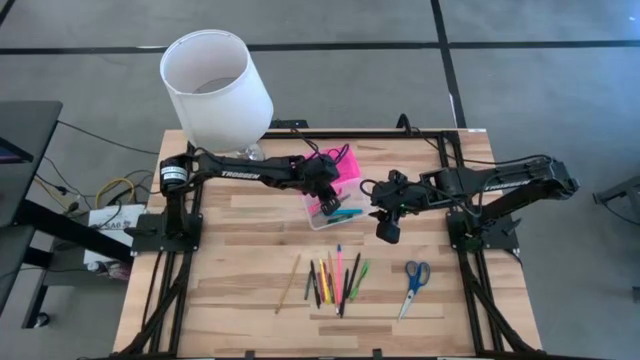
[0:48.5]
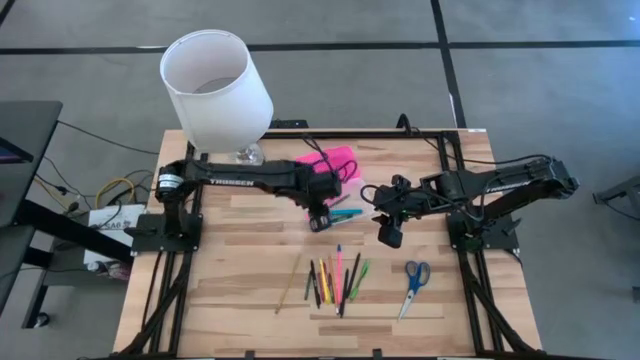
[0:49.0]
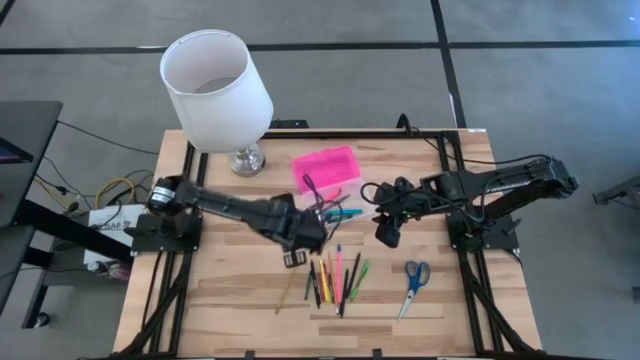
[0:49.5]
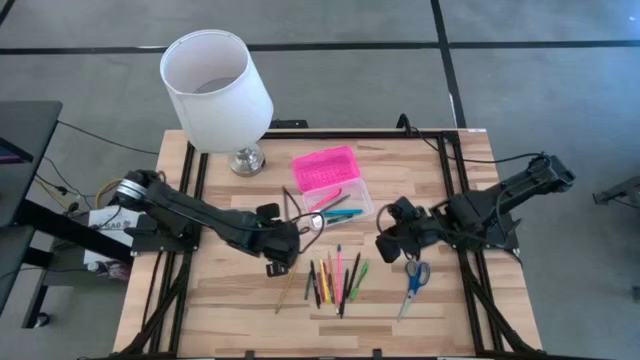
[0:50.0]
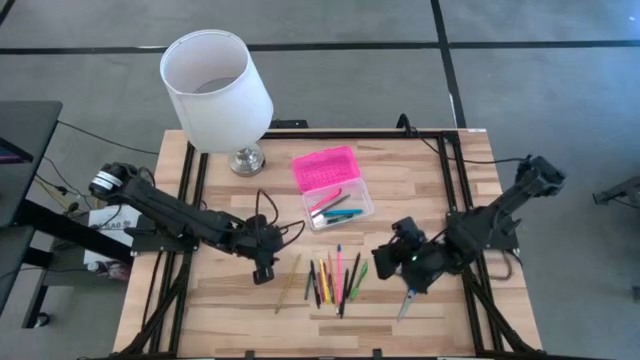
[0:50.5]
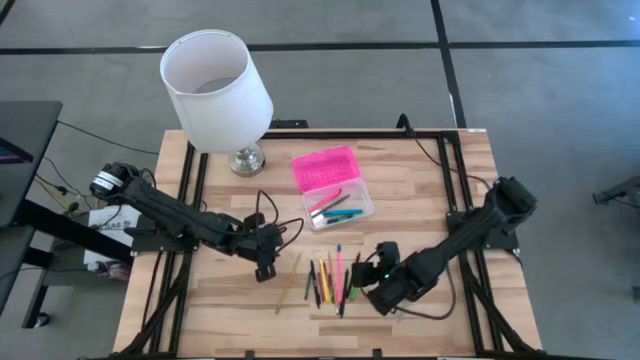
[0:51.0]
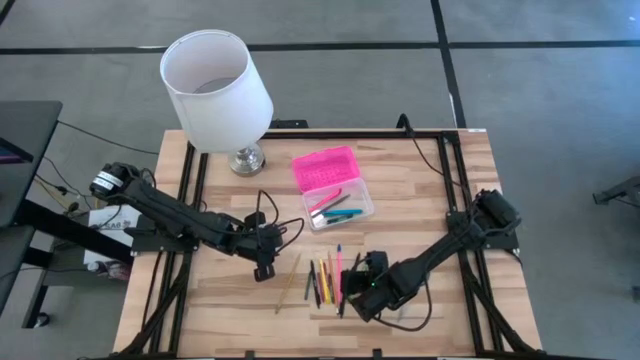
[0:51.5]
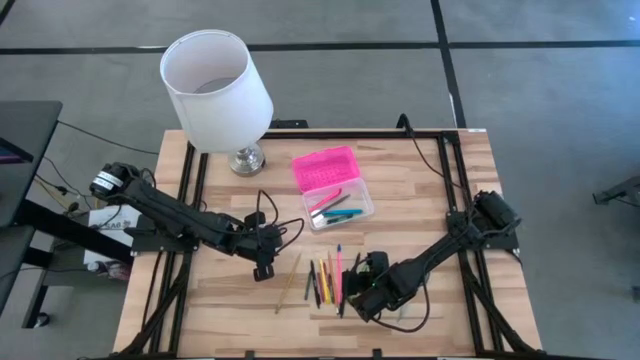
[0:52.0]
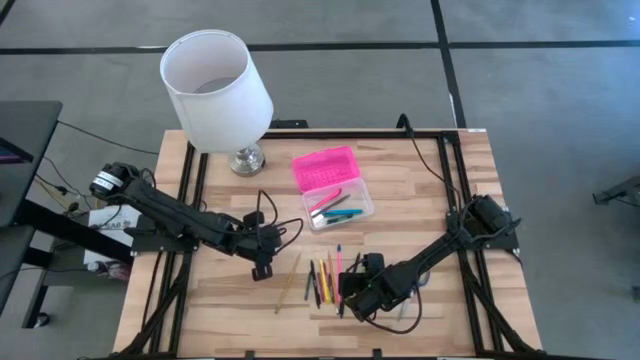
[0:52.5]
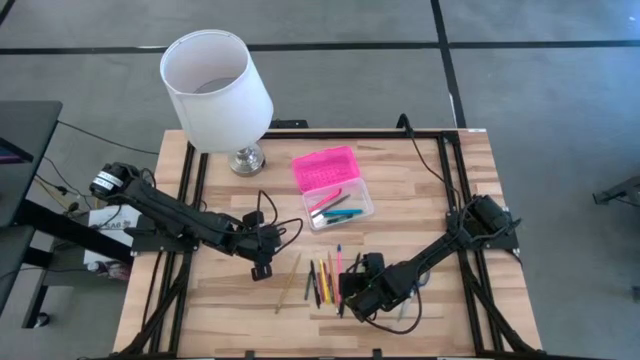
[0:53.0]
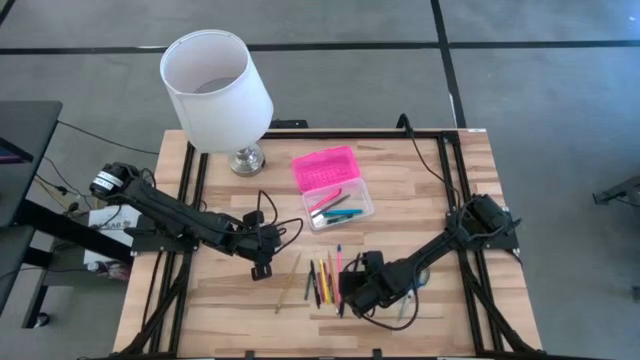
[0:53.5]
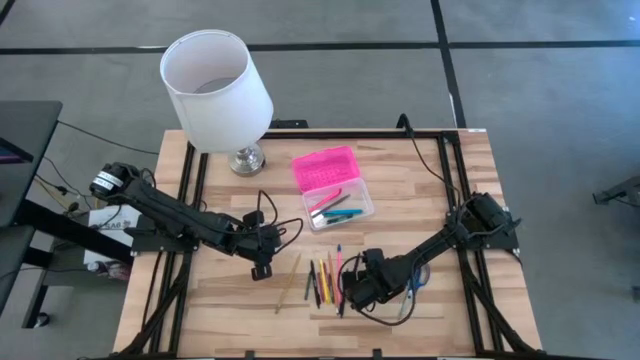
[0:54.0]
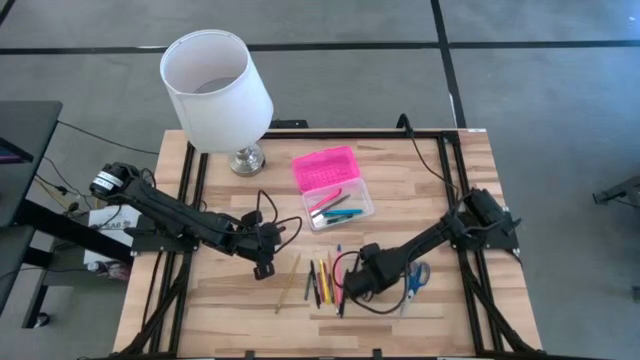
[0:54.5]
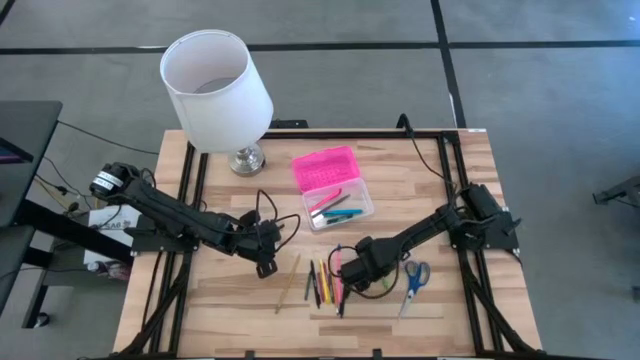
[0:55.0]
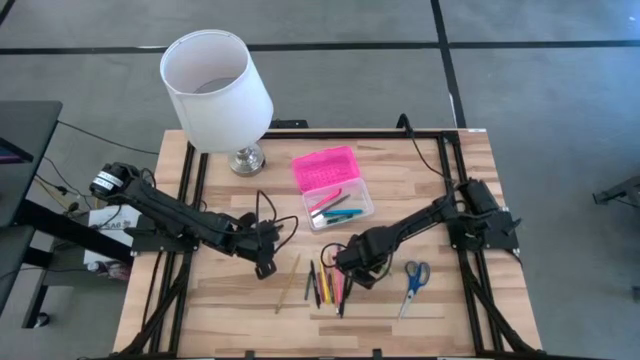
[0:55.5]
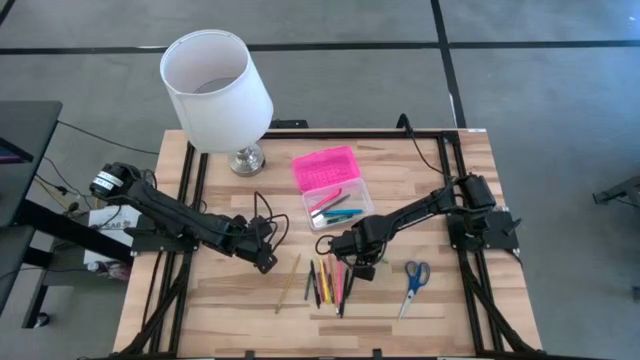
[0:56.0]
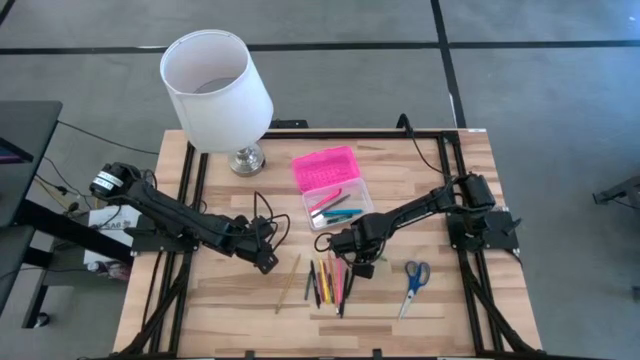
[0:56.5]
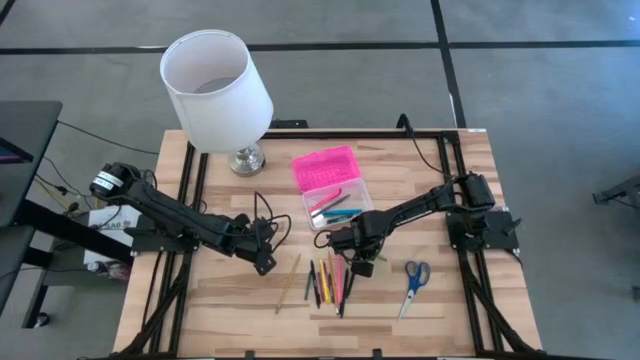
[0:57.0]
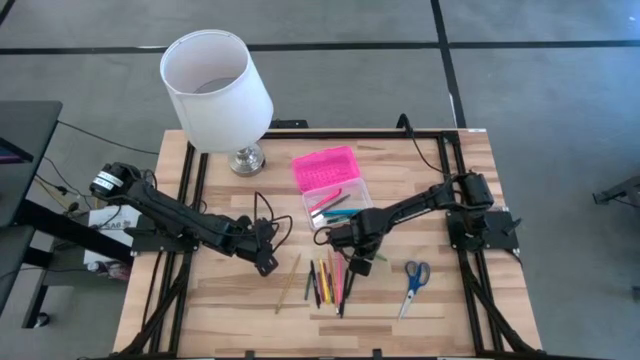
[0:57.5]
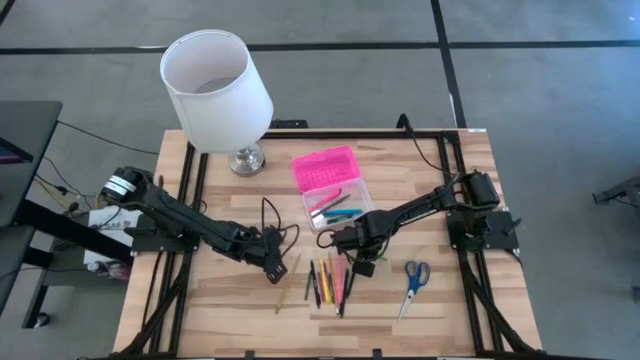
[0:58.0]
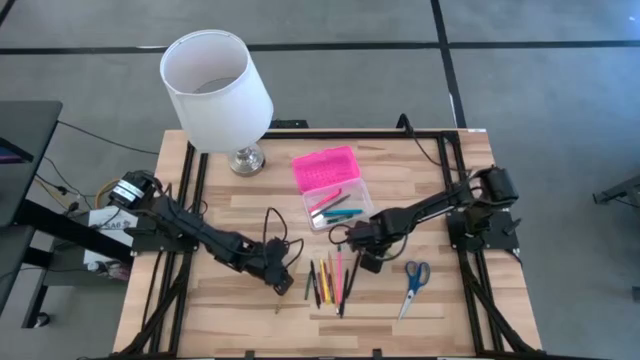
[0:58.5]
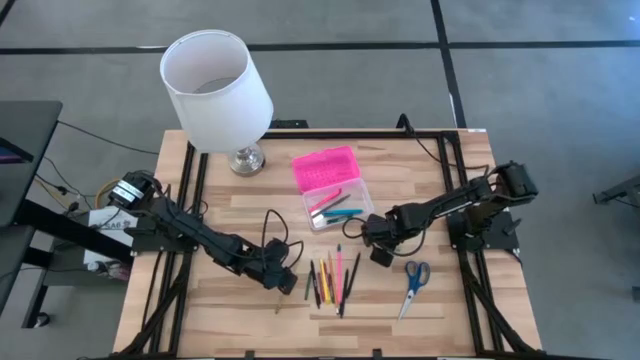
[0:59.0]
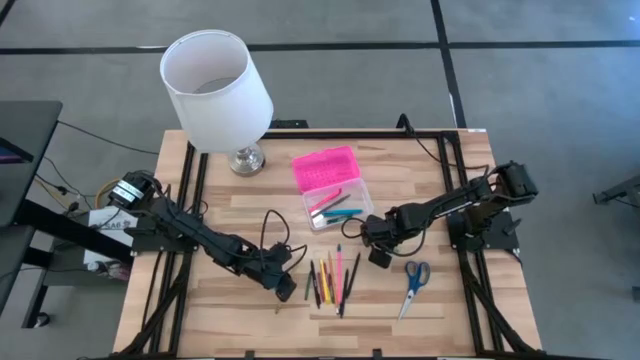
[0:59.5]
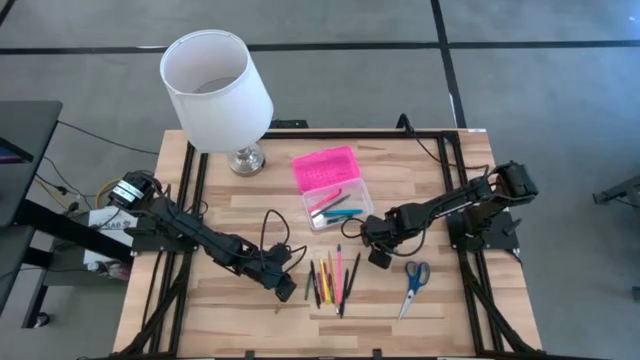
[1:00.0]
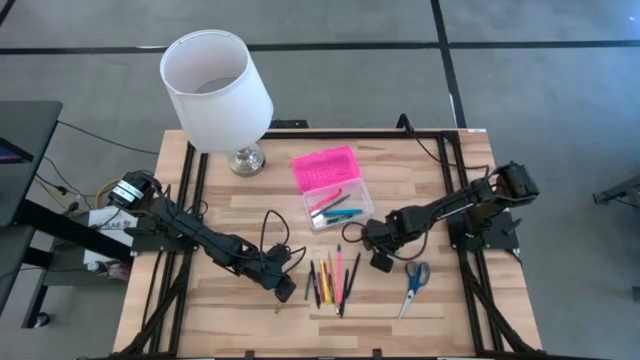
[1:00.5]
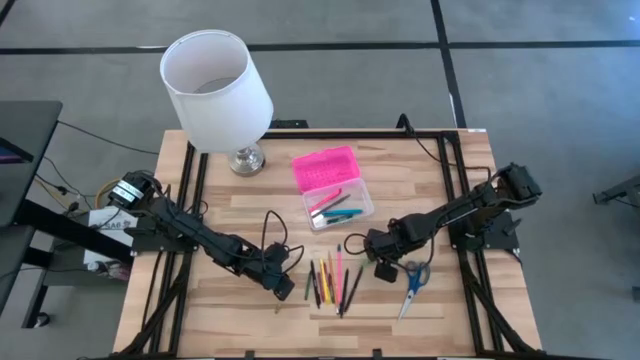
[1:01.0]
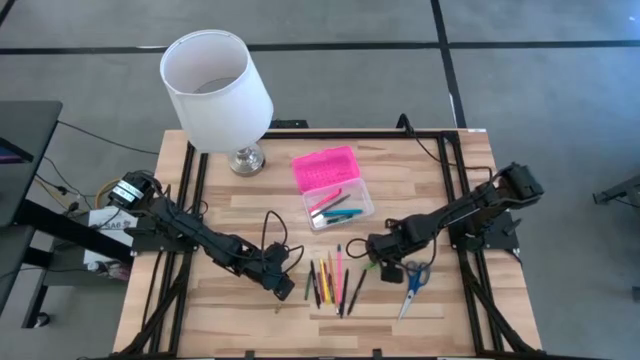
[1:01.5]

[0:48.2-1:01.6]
Task: Pick & place school supplies into a supply box
Put the green pen into the pink supply box

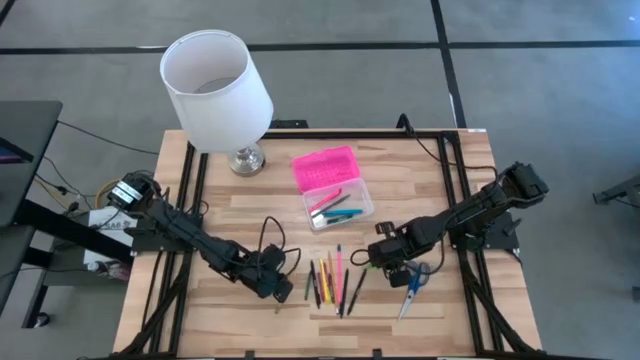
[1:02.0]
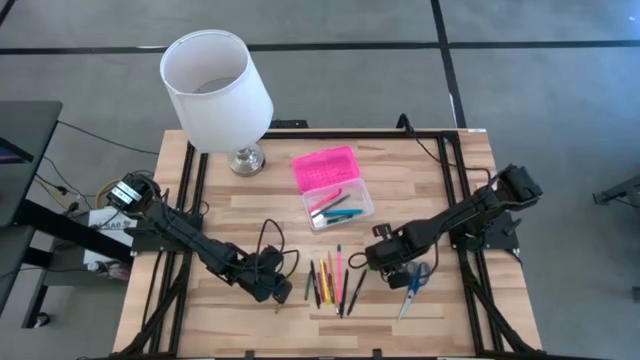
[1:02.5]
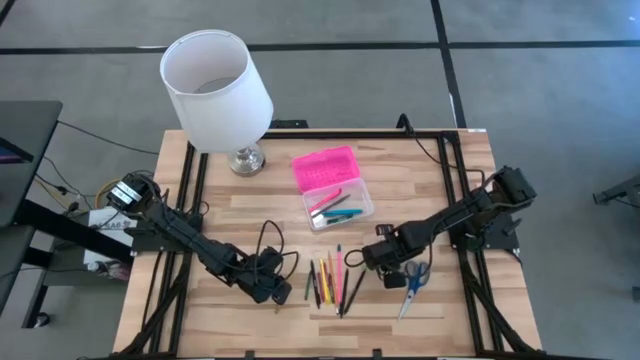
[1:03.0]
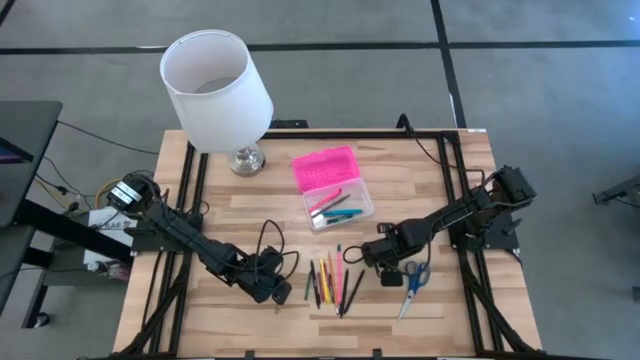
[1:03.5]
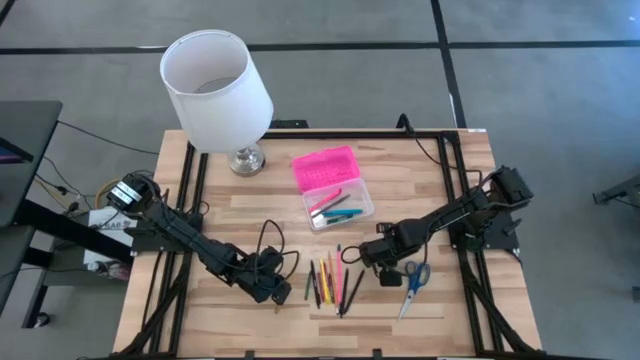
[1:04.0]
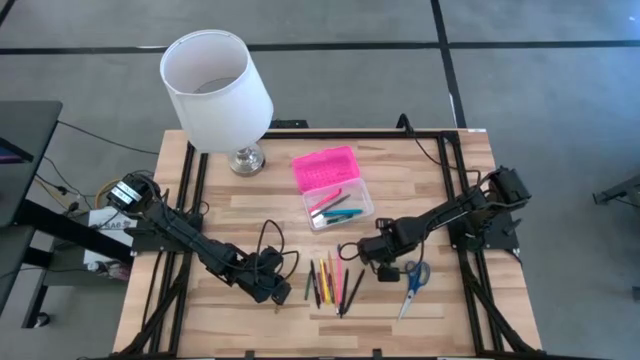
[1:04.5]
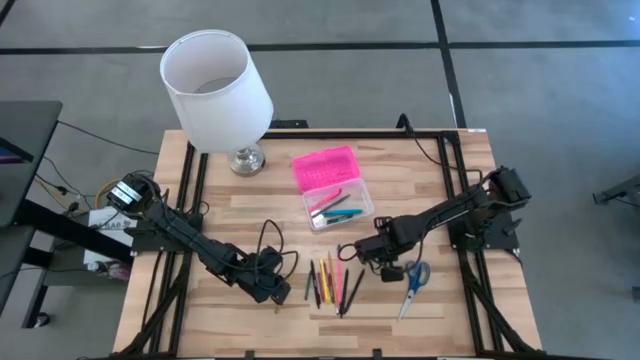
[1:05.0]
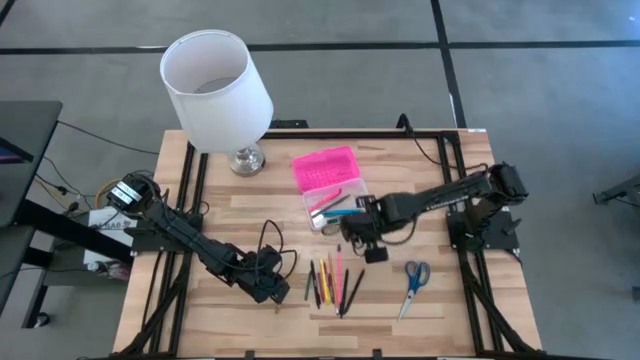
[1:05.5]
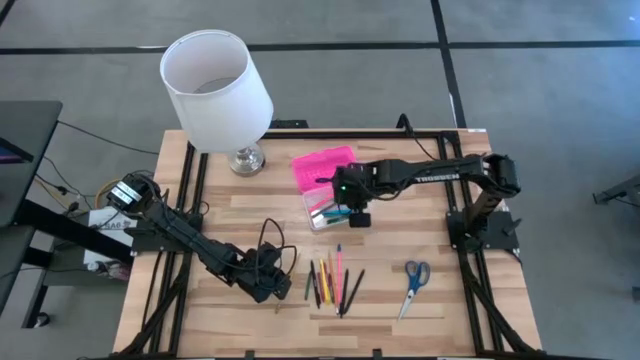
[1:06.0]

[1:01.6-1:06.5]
Put the green pen into the pink supply box

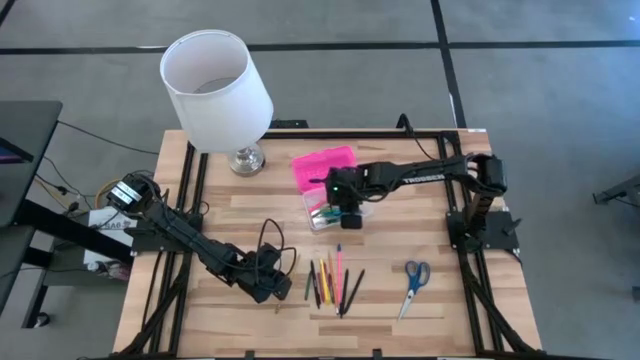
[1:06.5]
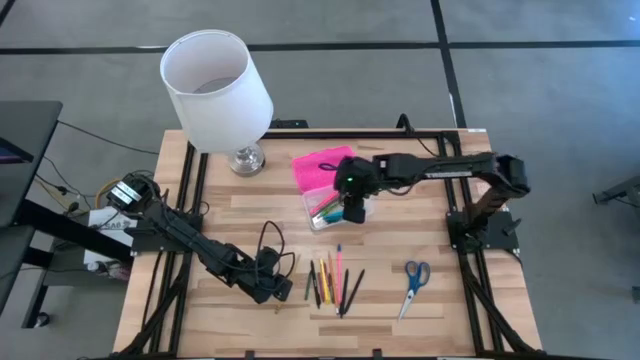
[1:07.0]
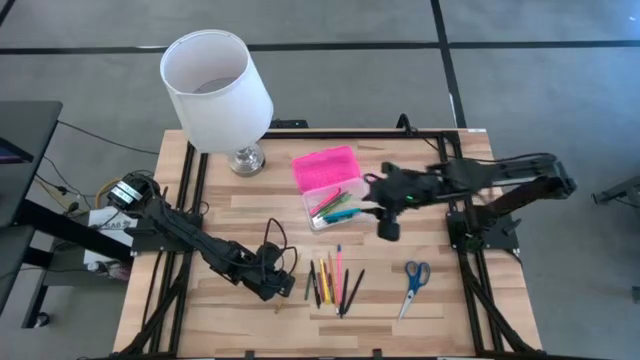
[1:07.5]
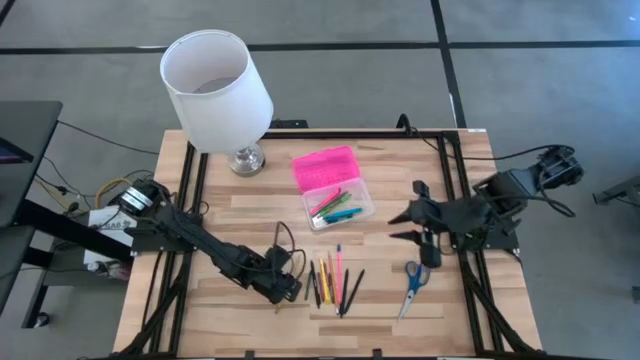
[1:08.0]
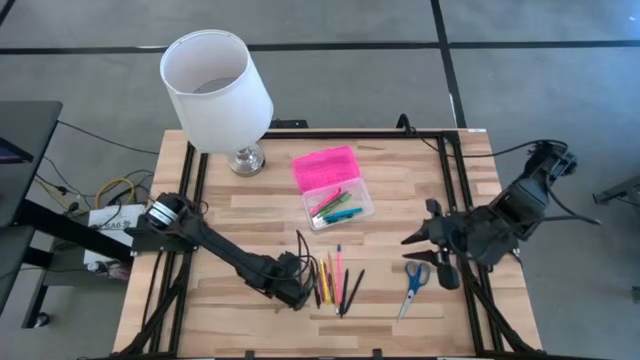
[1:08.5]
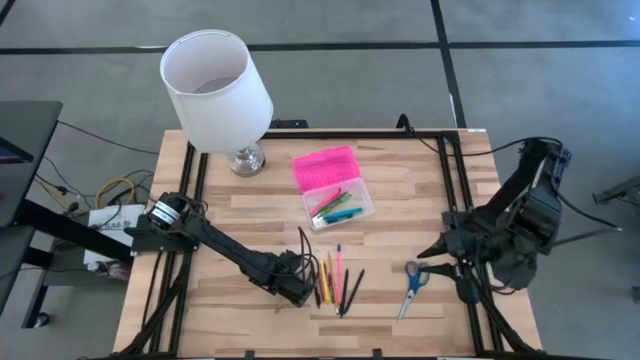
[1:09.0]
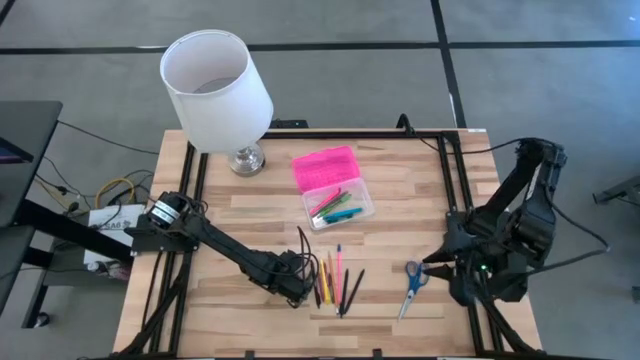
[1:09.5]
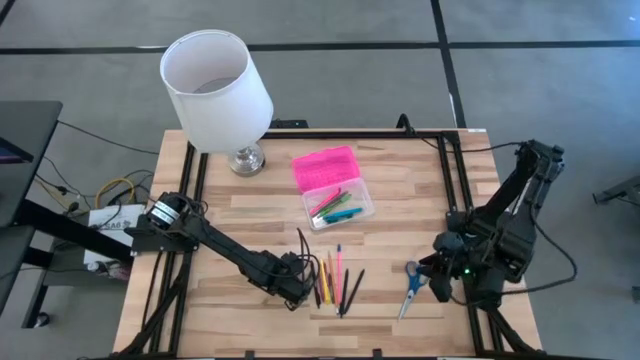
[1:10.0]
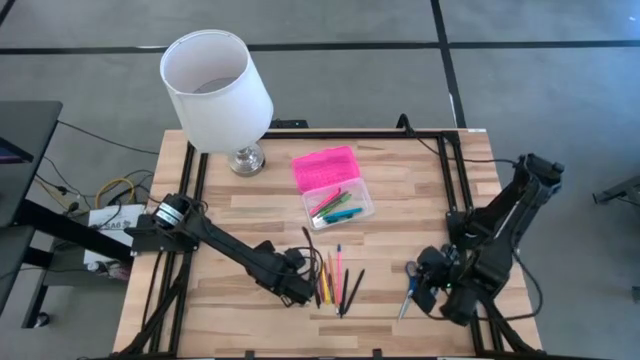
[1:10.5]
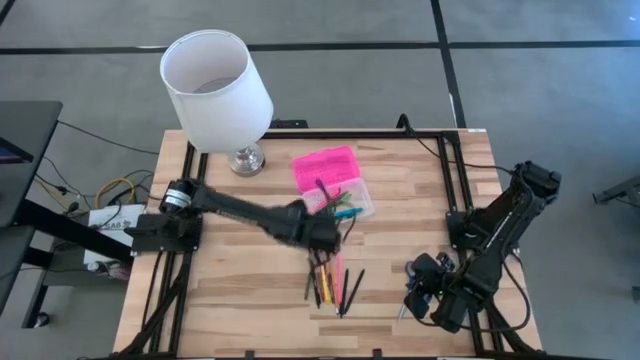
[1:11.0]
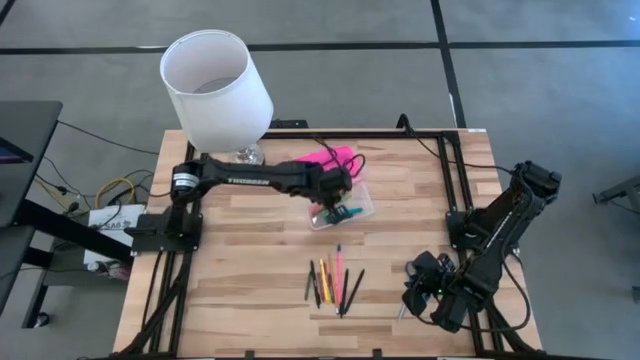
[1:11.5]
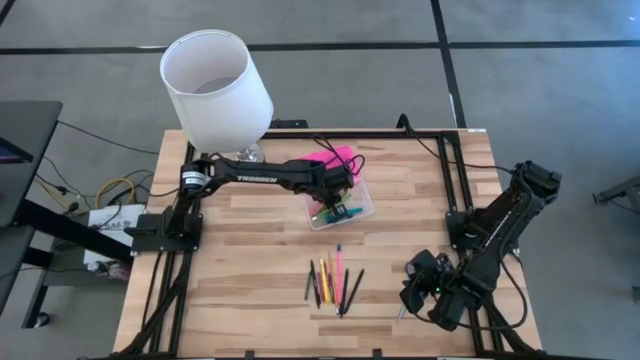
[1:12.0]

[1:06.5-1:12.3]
Put the yellow pencil into the pink supply box
